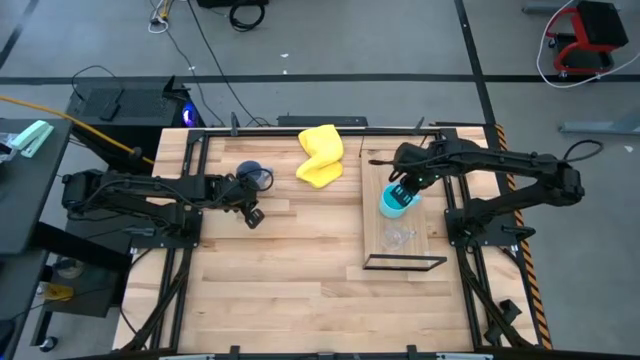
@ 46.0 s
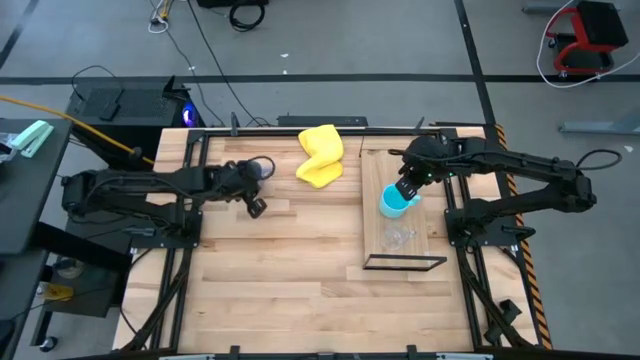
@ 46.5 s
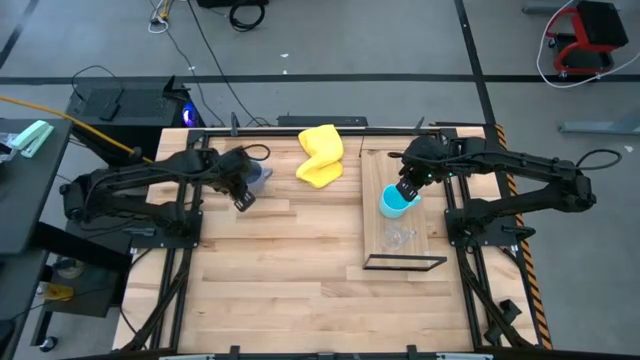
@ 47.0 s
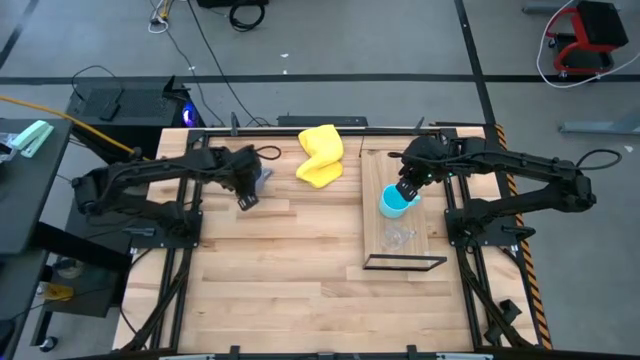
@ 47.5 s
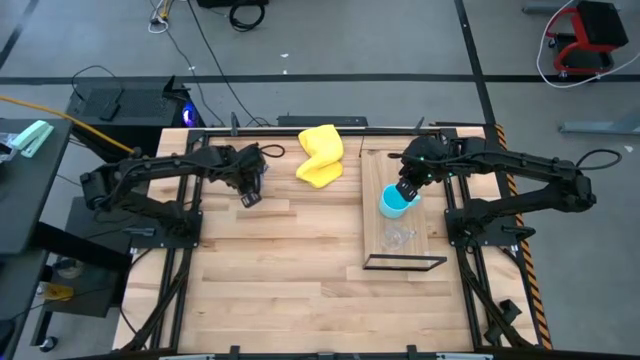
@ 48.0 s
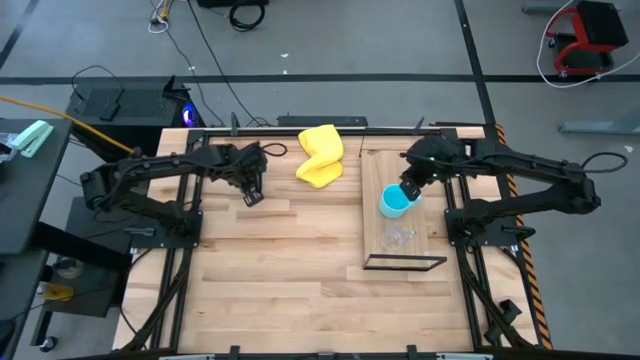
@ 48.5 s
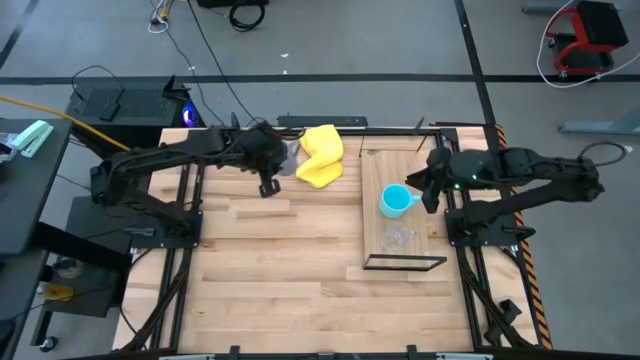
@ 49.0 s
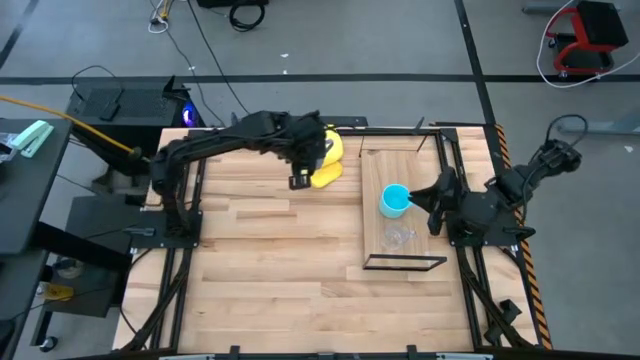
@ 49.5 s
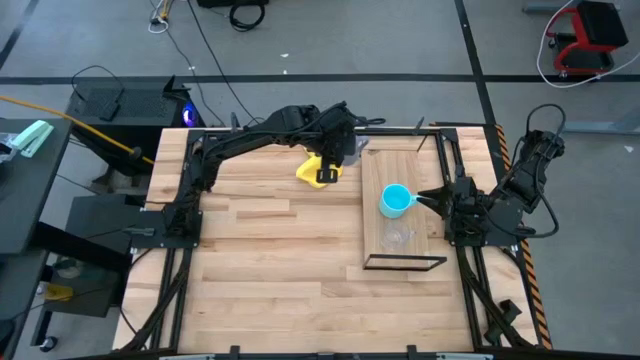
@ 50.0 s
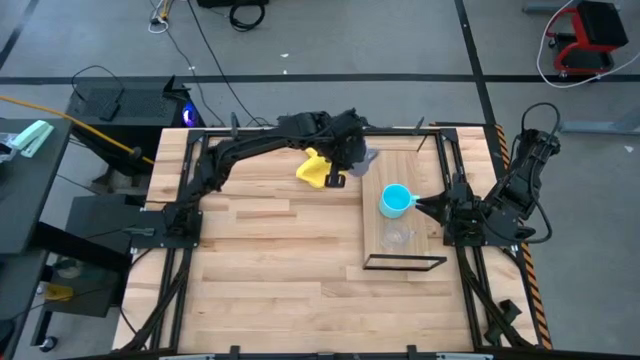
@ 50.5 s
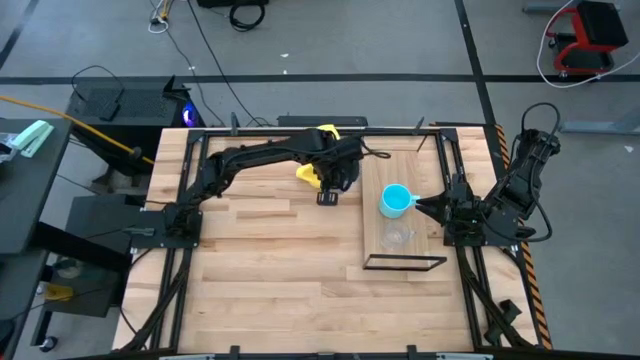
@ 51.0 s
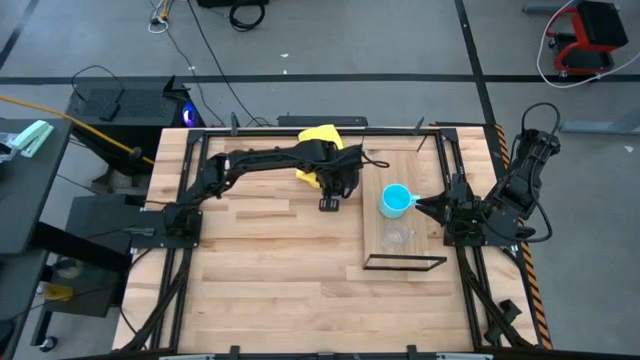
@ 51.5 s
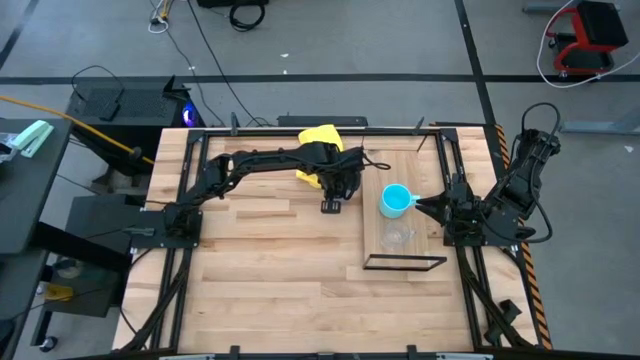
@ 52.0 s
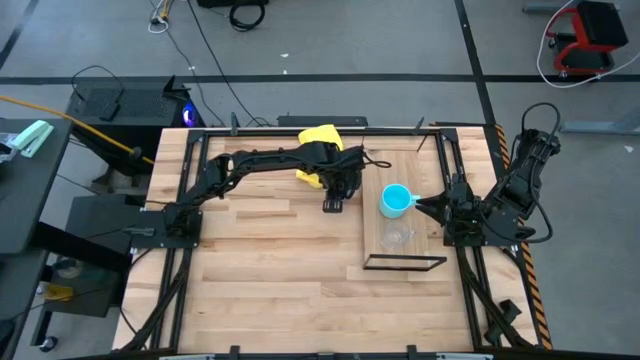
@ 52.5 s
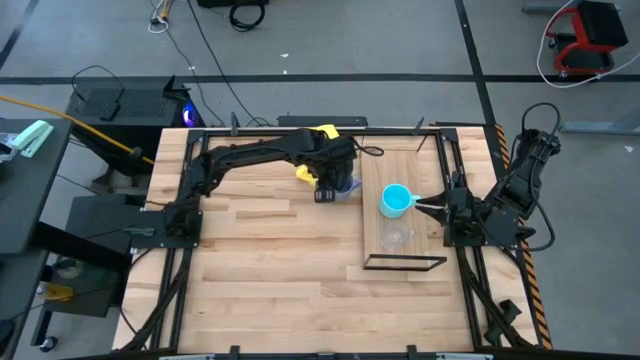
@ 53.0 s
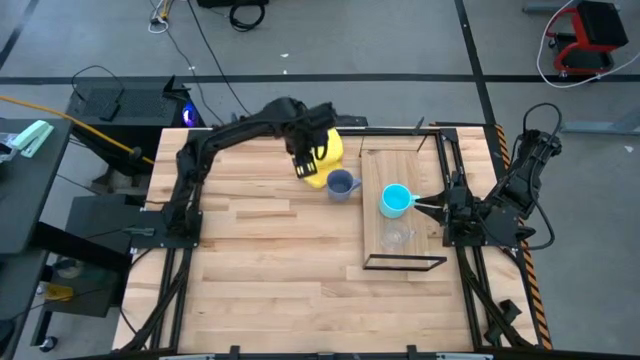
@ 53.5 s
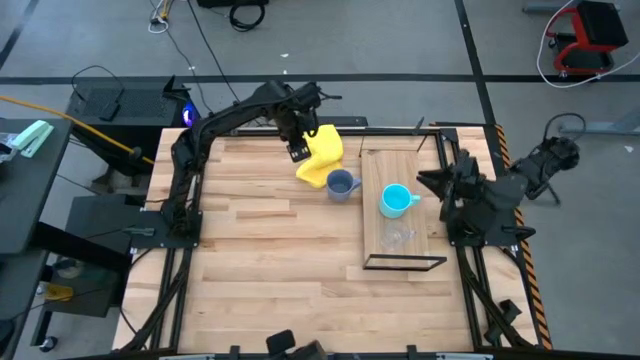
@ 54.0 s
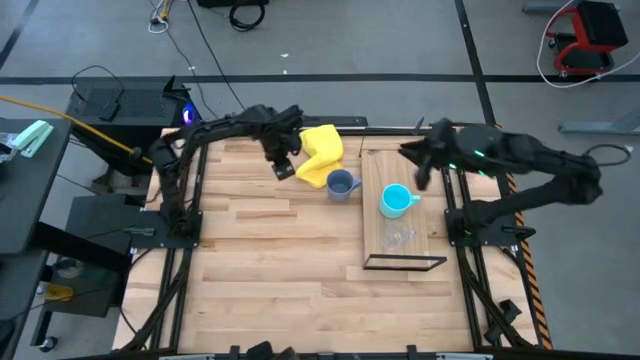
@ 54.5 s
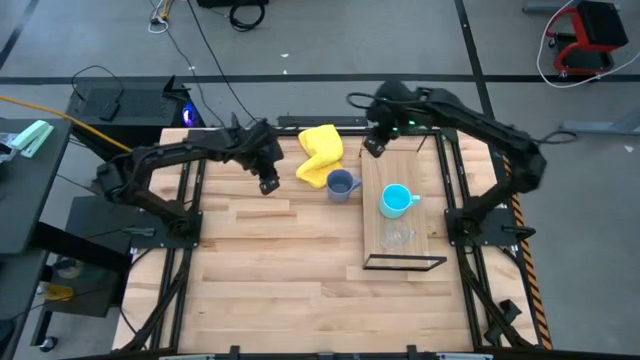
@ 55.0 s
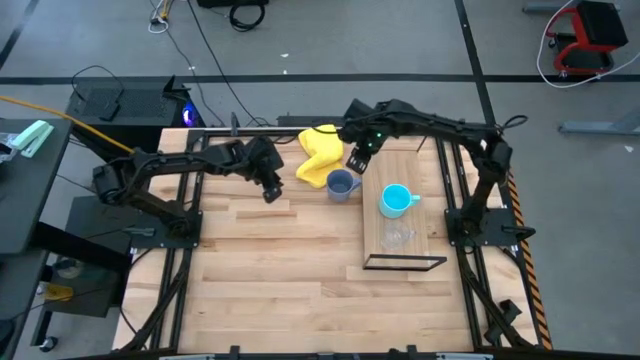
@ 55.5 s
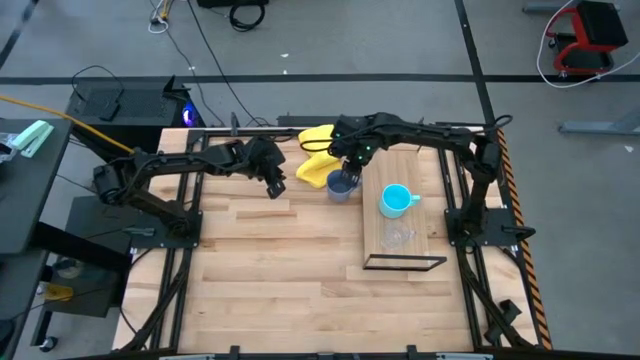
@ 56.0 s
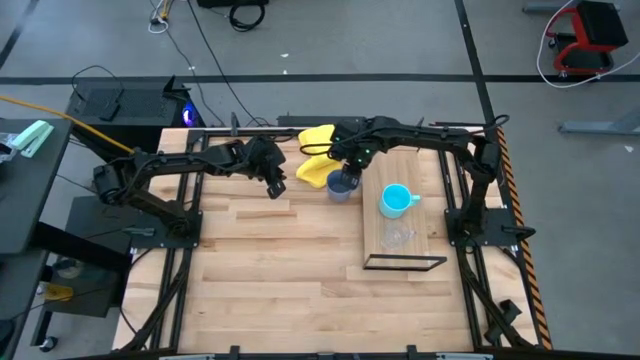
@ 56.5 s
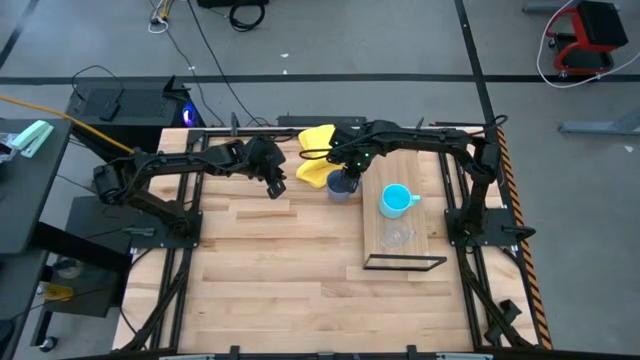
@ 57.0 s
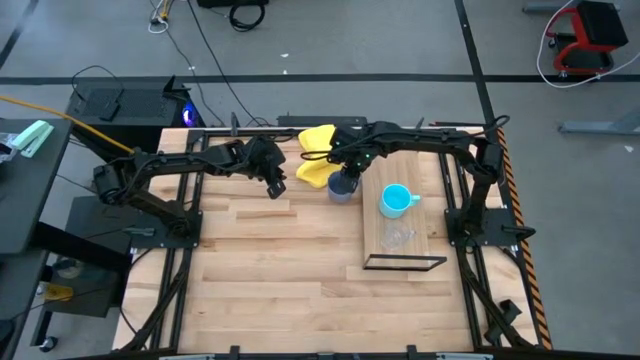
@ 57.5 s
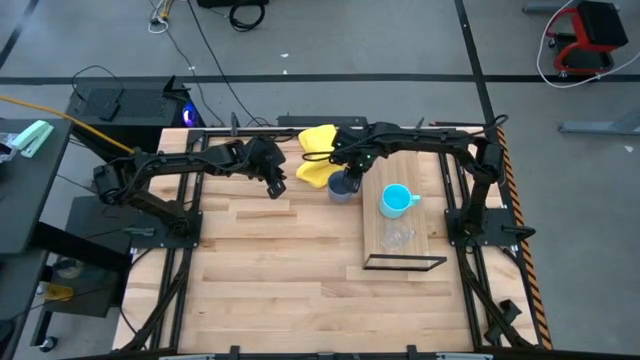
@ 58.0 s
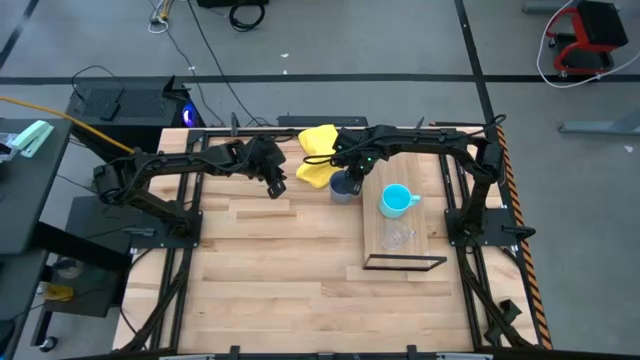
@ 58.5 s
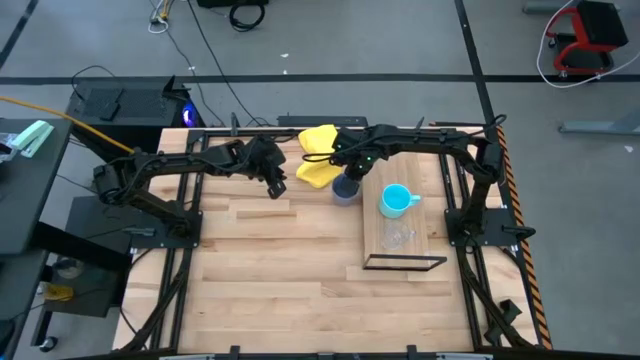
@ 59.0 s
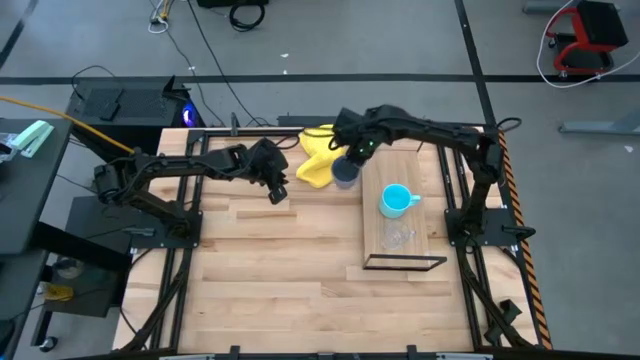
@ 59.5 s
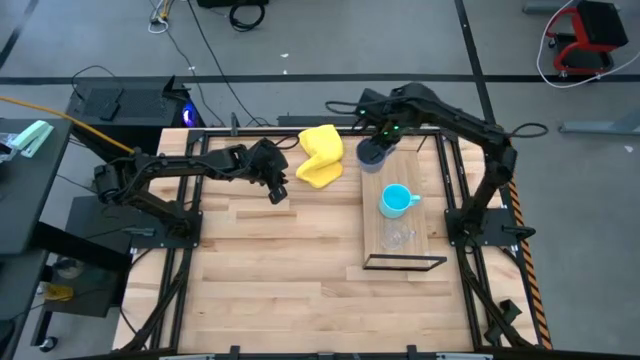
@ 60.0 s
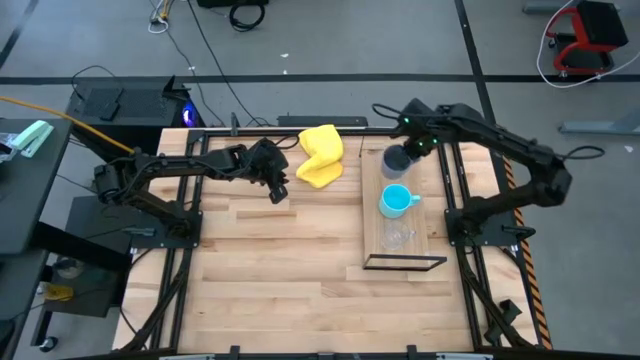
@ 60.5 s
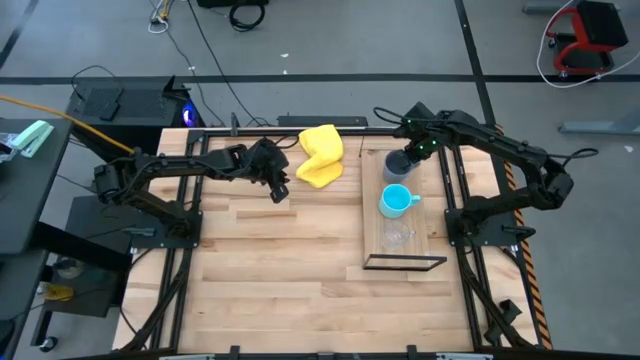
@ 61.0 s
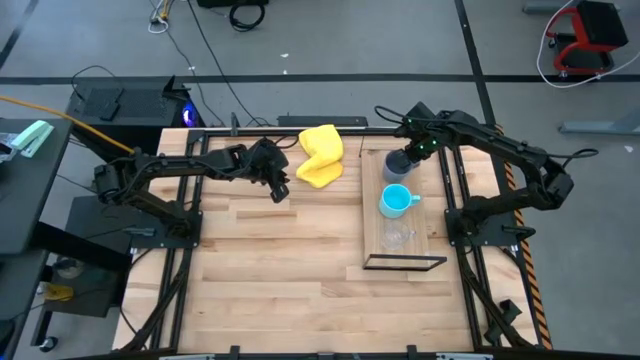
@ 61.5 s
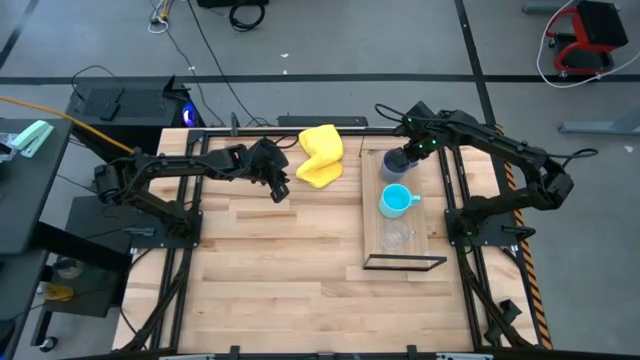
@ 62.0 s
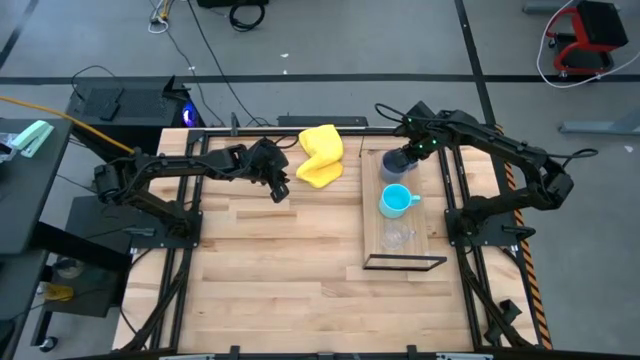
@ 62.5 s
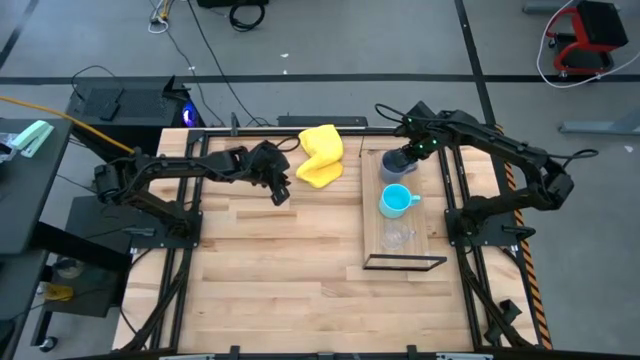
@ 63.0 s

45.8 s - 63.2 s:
Task: Stack small to large cups/mugs on shelf
Put the gray mug on the shelf

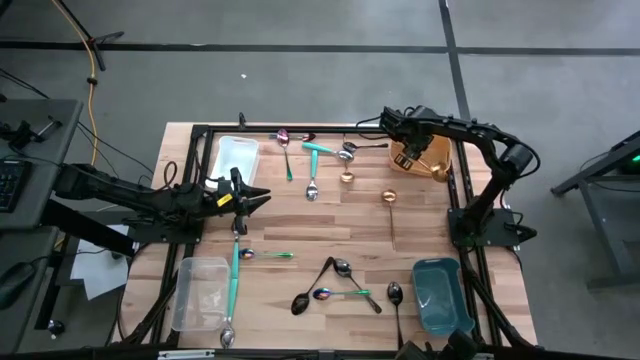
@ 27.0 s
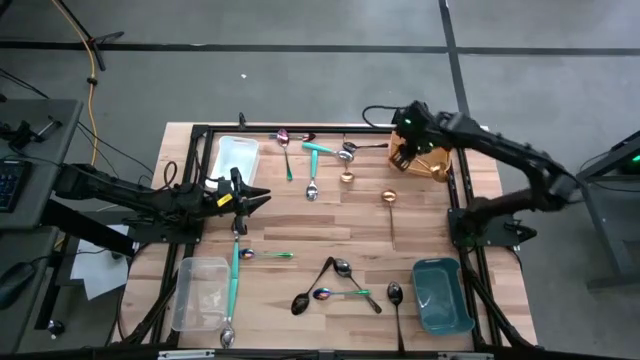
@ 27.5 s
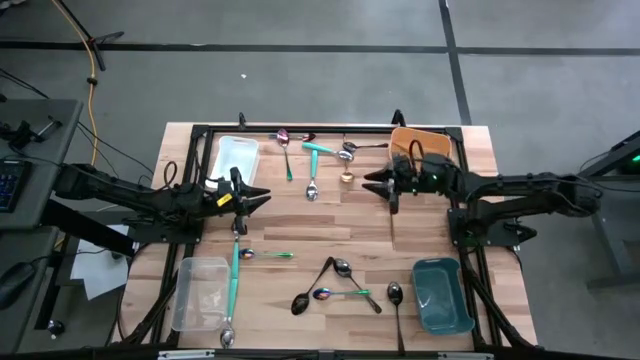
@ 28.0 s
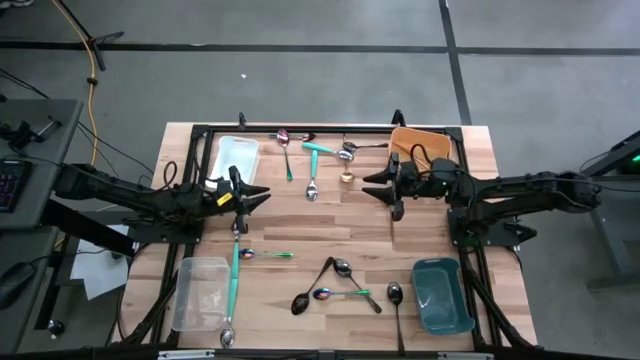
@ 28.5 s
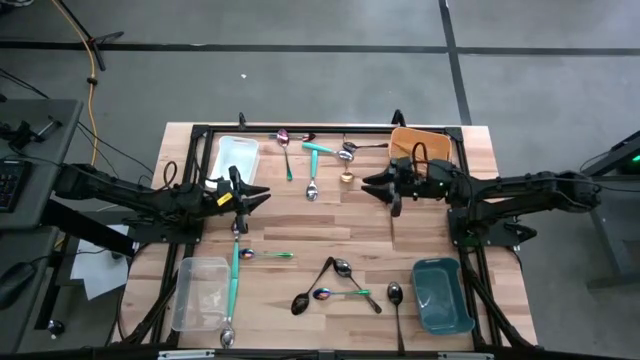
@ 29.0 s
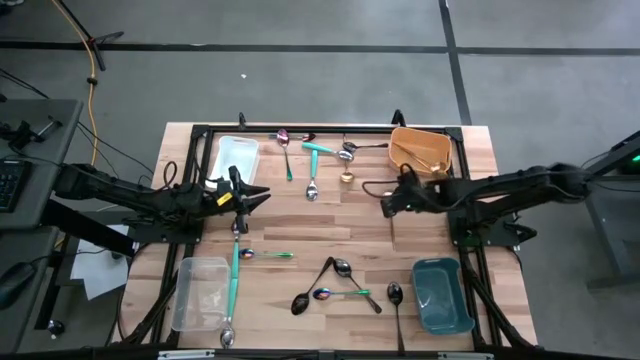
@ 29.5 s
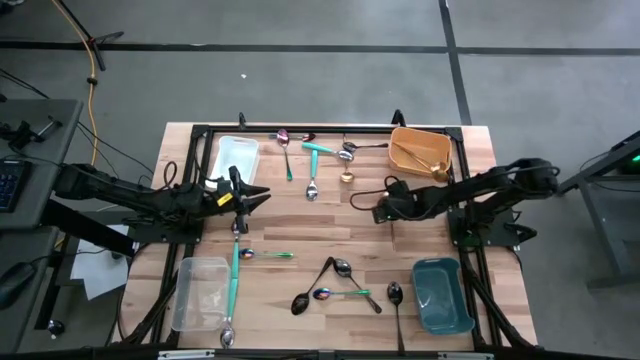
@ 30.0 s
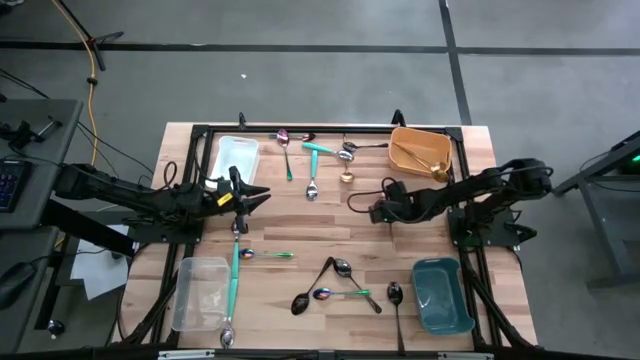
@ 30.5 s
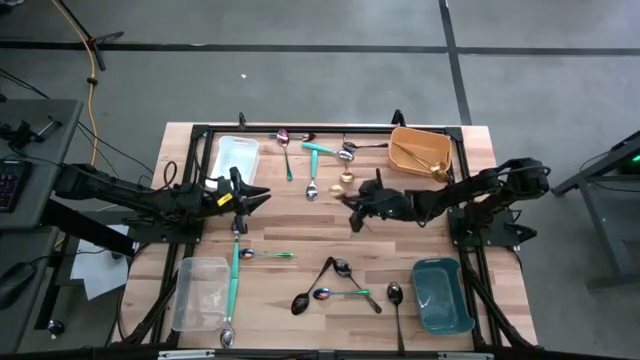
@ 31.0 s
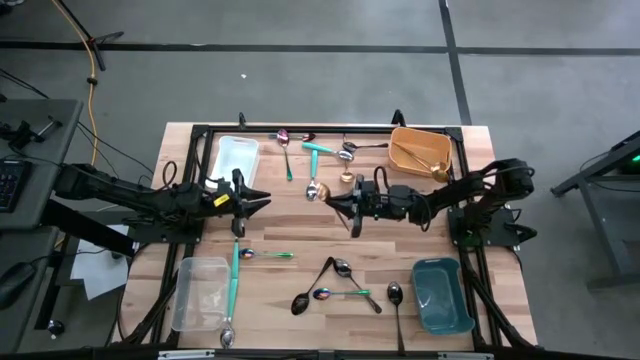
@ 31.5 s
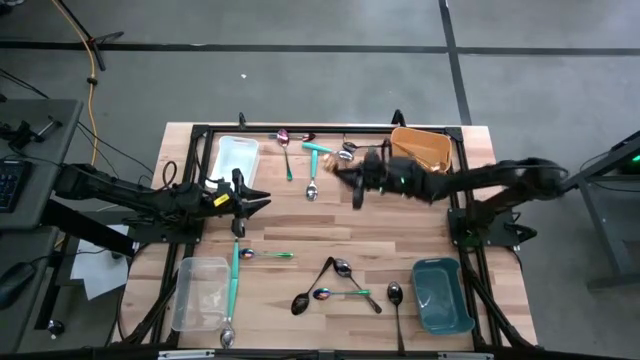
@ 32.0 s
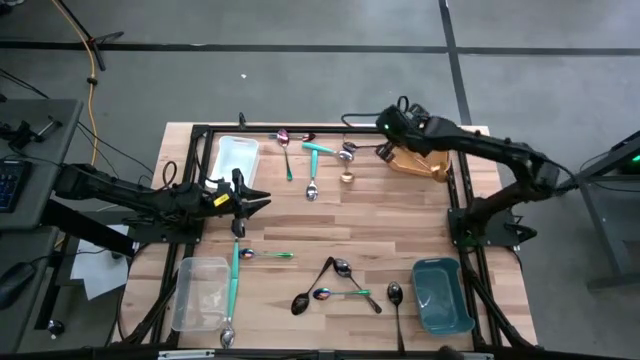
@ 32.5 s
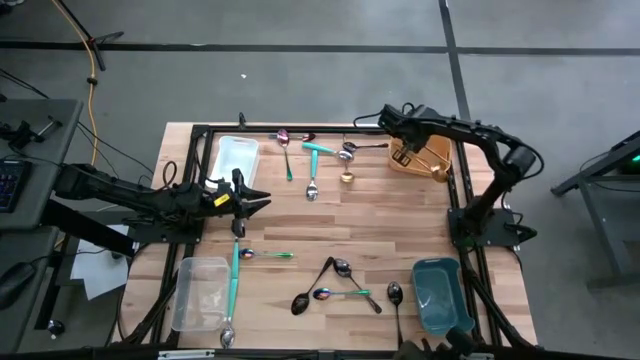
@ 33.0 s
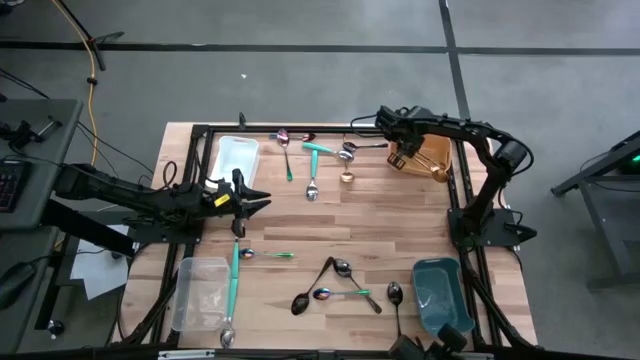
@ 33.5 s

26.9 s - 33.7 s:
Task: Sort silverware by color (type)
Put the gold spoon into the yellow bin
